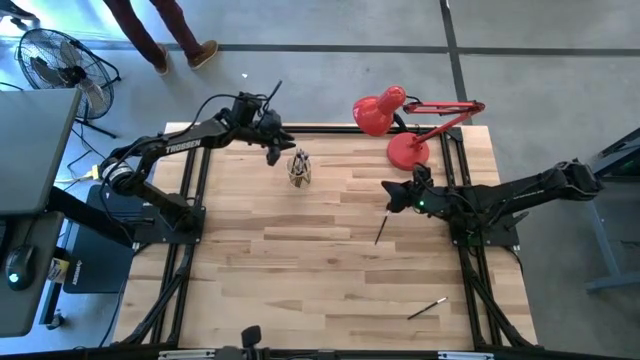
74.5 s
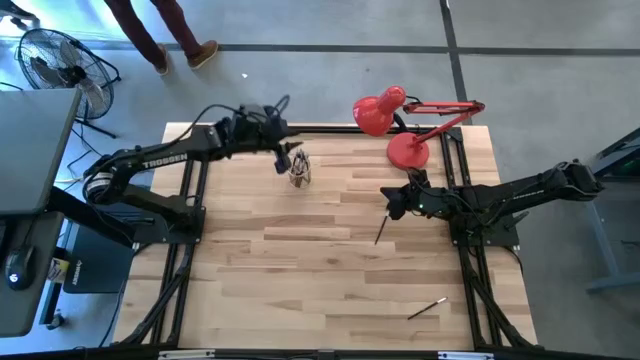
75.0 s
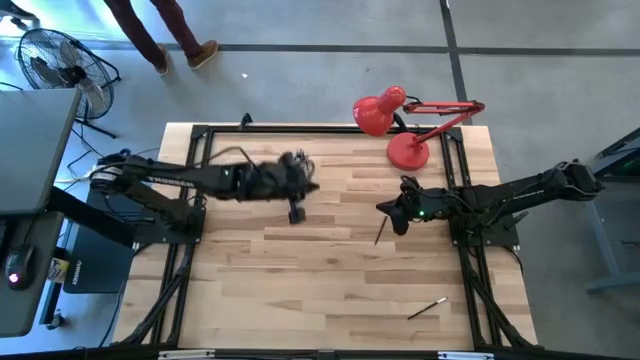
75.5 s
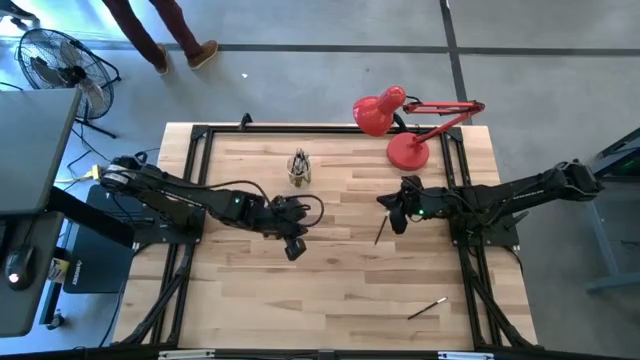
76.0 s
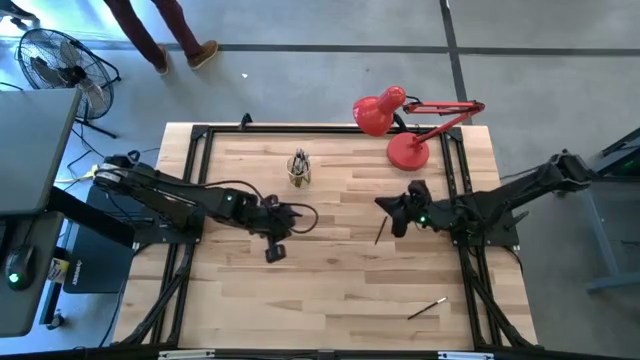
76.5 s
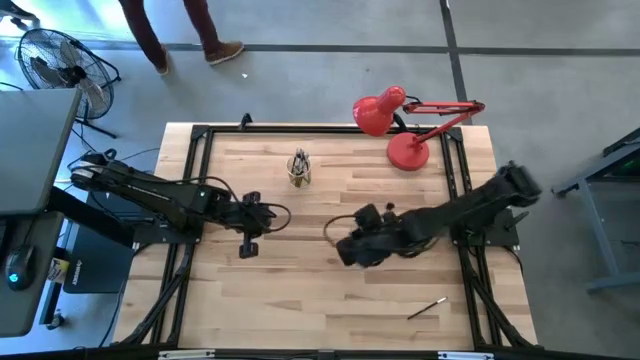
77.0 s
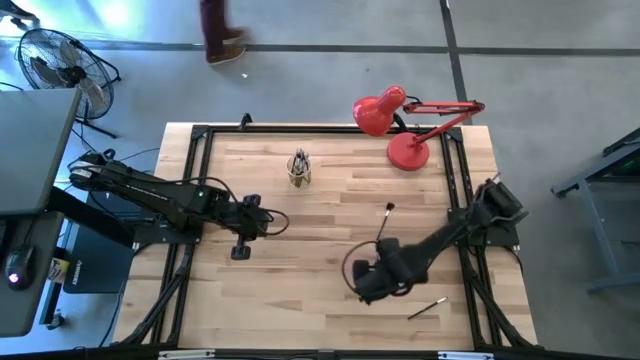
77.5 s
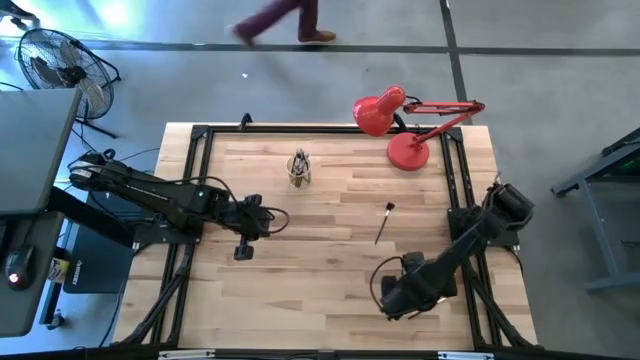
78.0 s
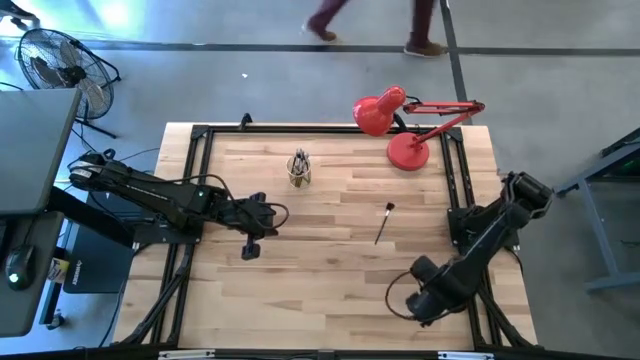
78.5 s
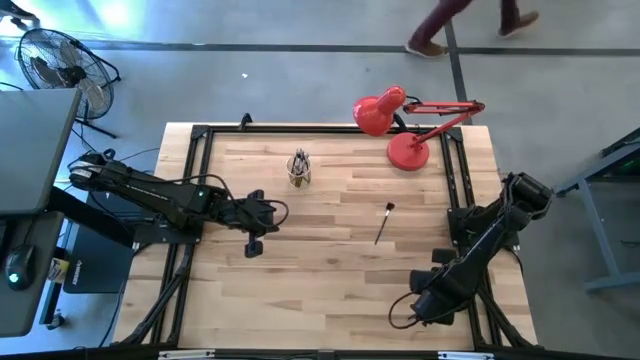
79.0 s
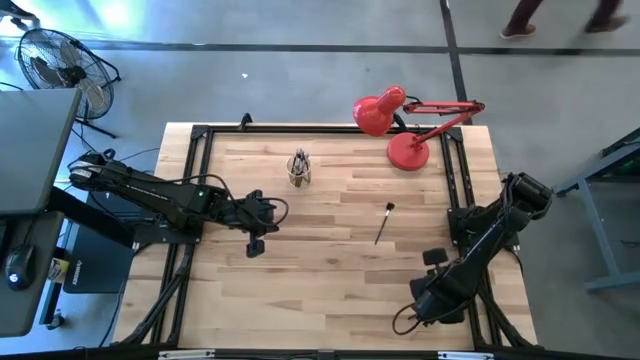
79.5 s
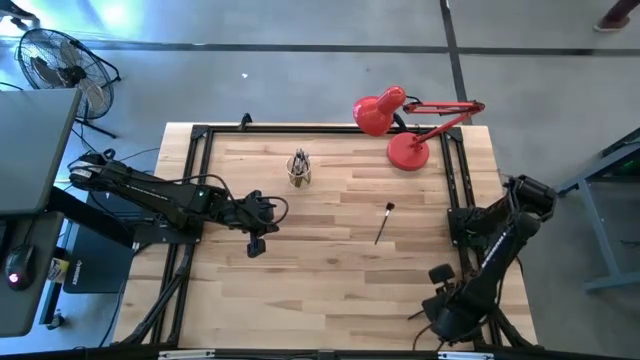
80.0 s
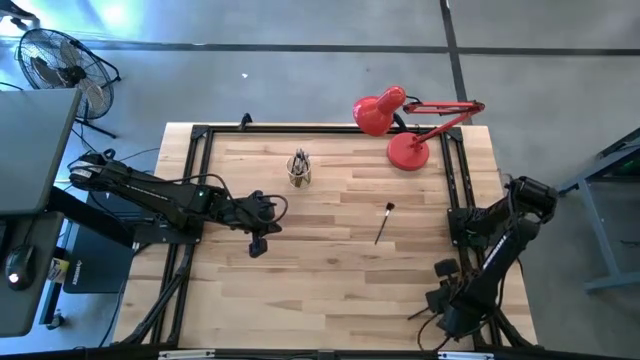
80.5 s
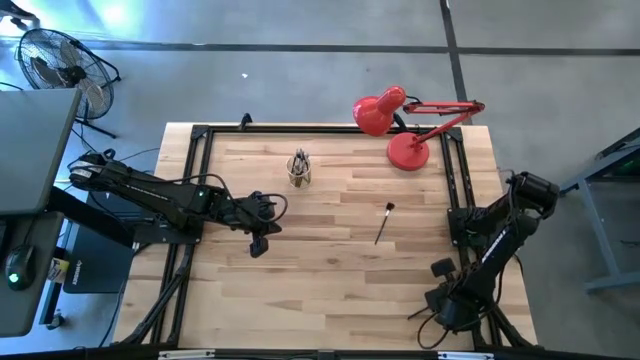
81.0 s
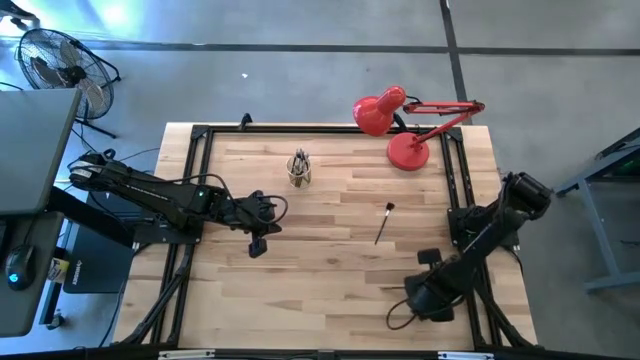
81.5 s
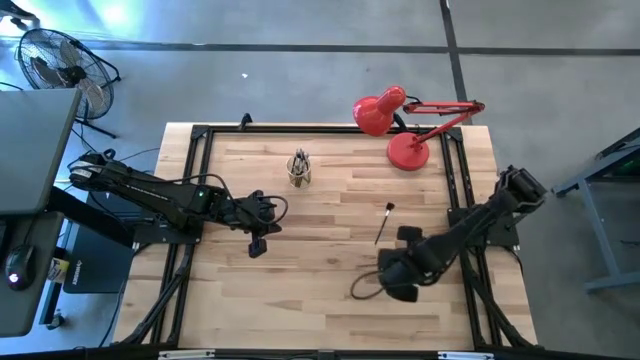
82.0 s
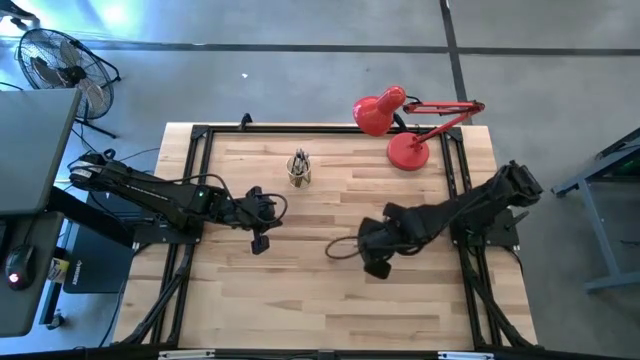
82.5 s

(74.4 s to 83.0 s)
Task: Put items in baskets/containers
Put the eyeliner brush into the wire organizer

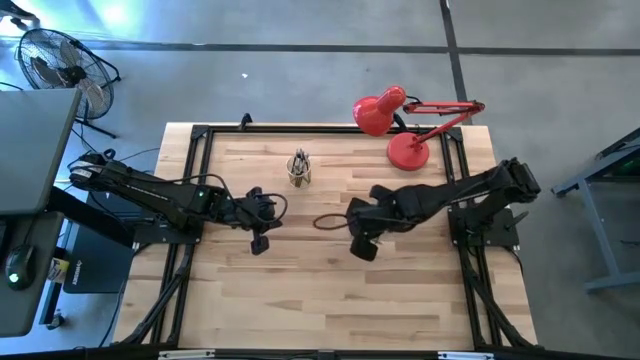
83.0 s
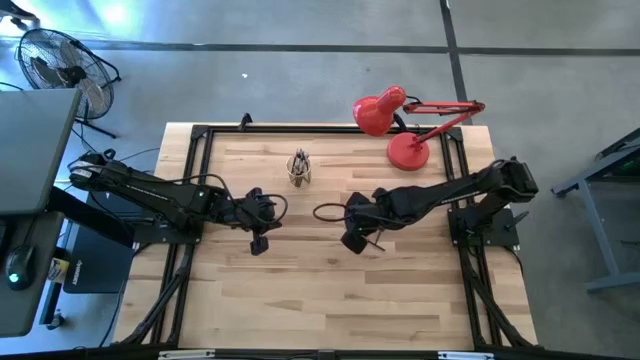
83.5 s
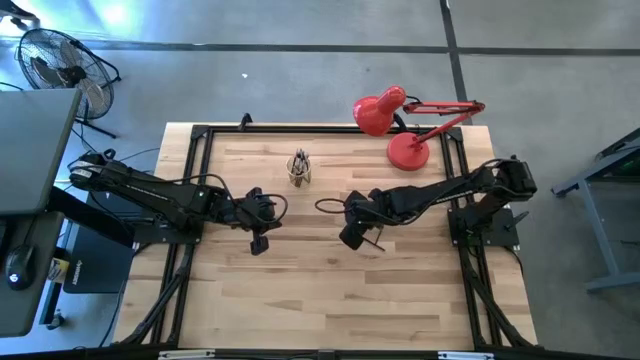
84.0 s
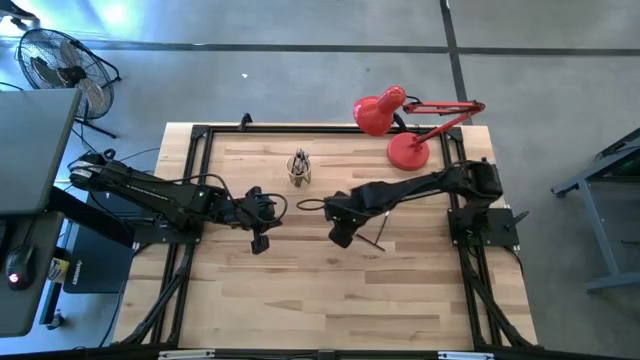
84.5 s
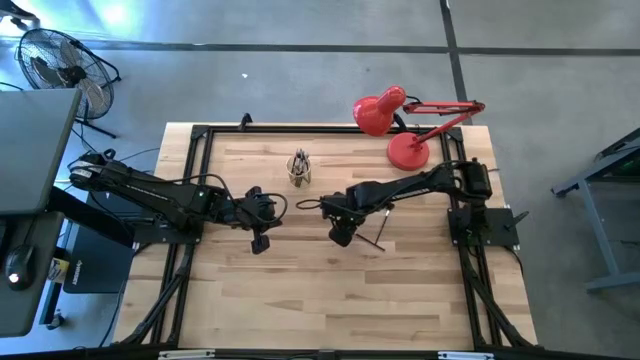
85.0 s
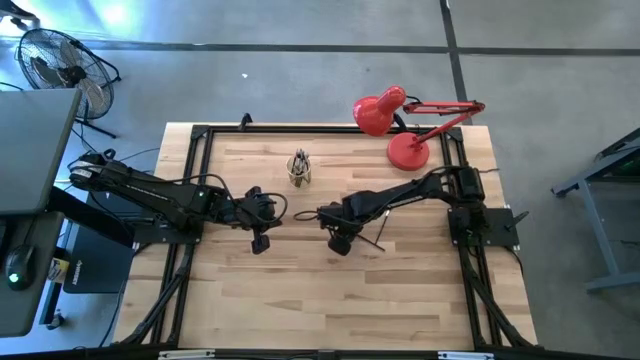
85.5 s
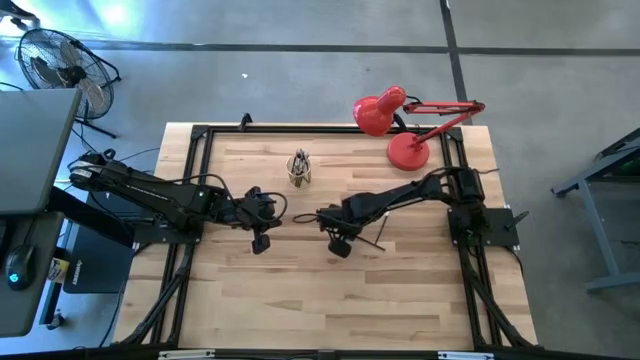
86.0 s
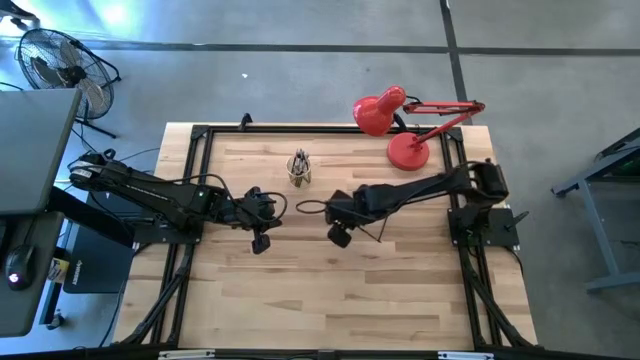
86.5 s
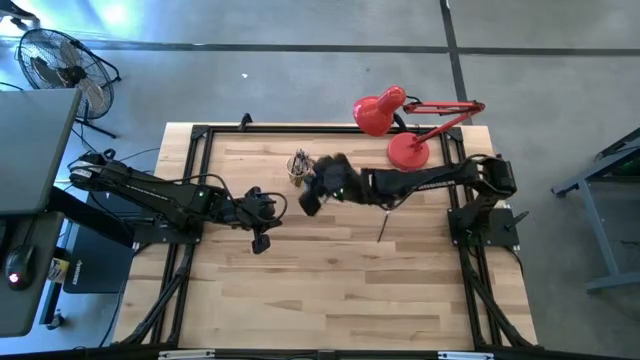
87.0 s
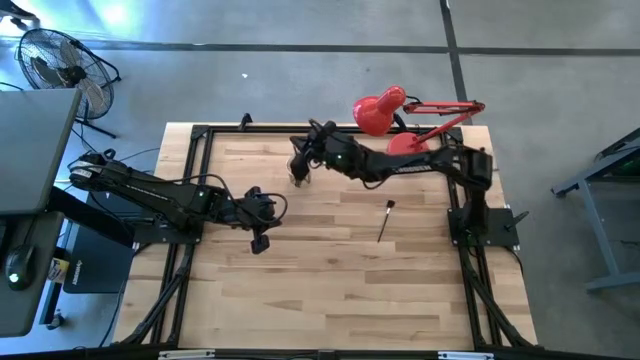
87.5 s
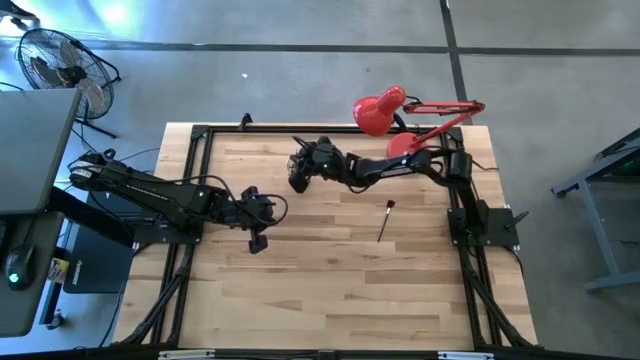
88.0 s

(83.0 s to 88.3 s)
Put the eyeliner brush into the wire organizer

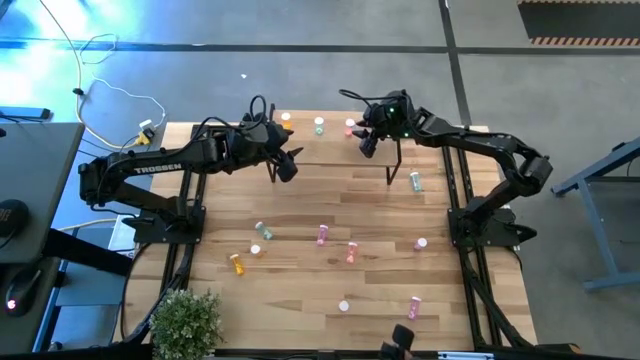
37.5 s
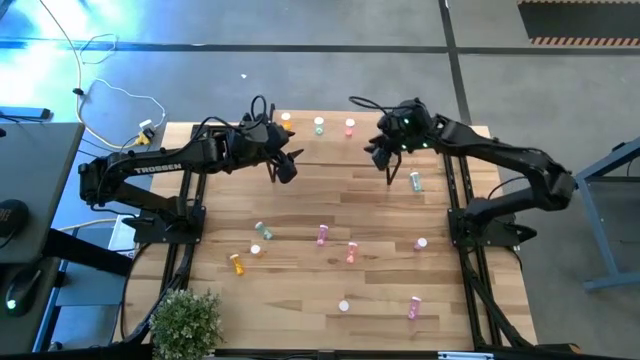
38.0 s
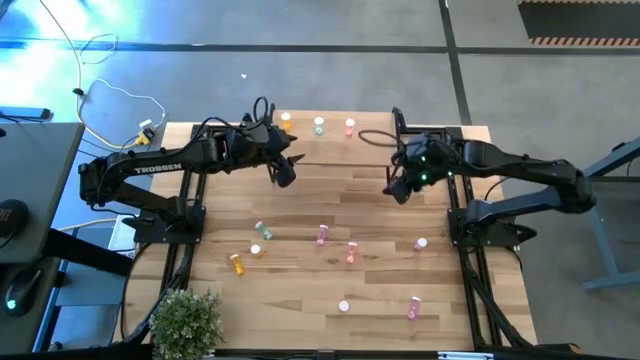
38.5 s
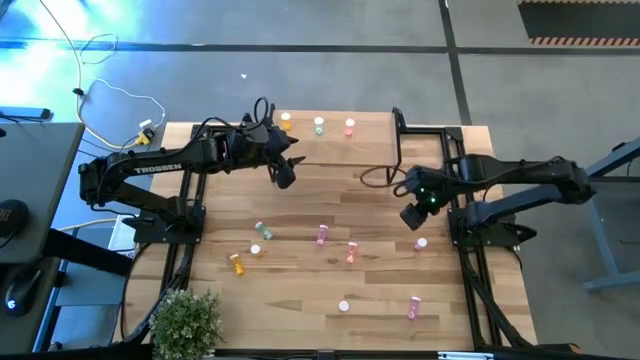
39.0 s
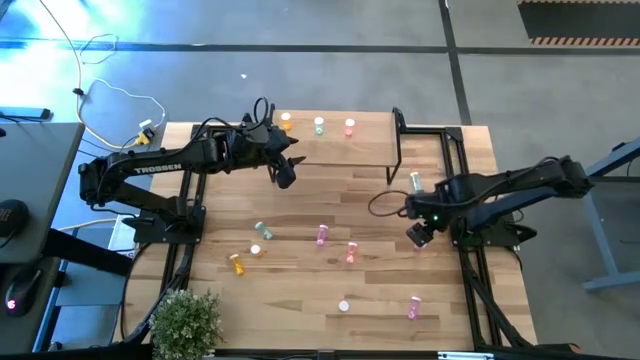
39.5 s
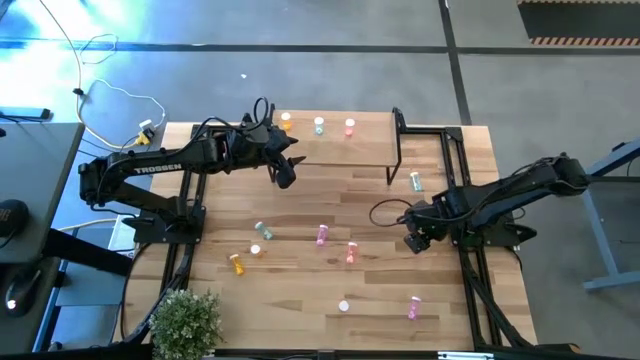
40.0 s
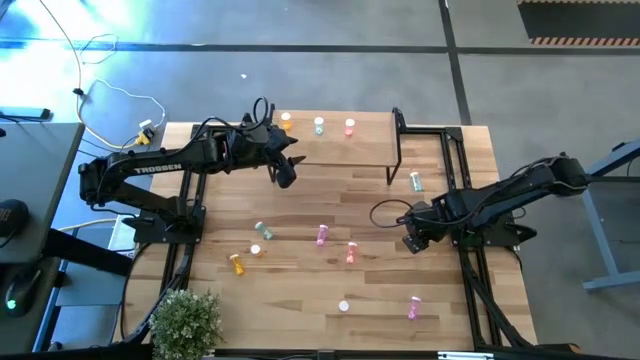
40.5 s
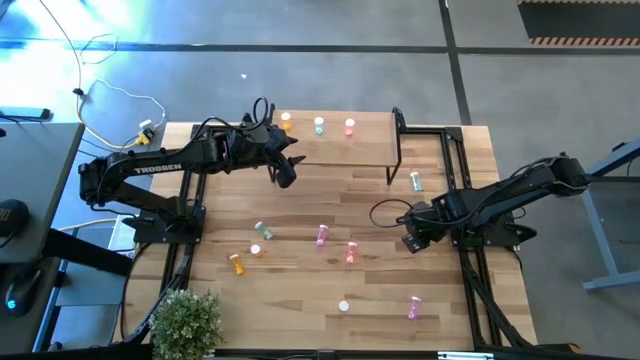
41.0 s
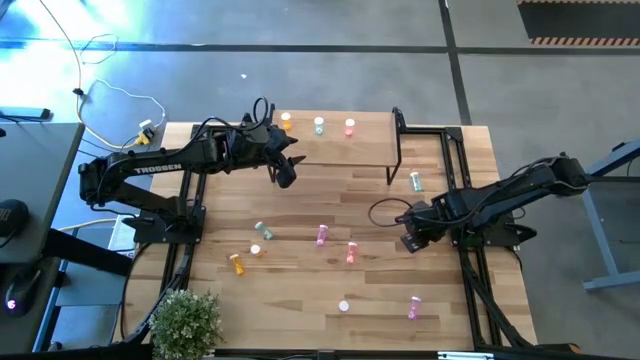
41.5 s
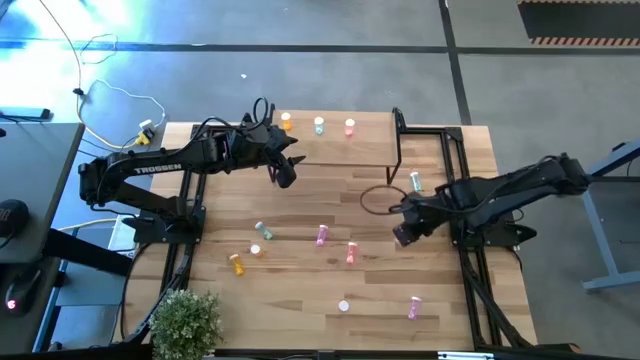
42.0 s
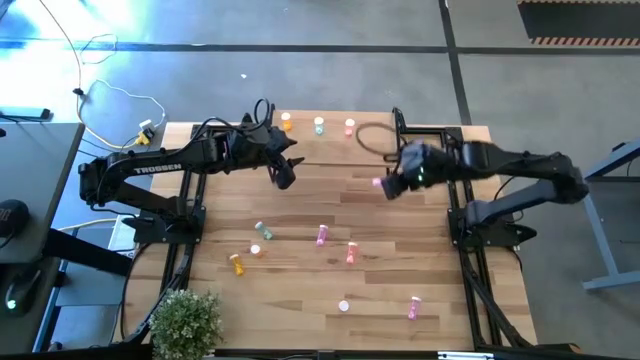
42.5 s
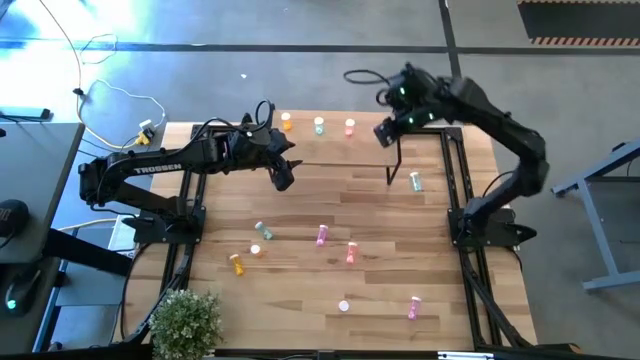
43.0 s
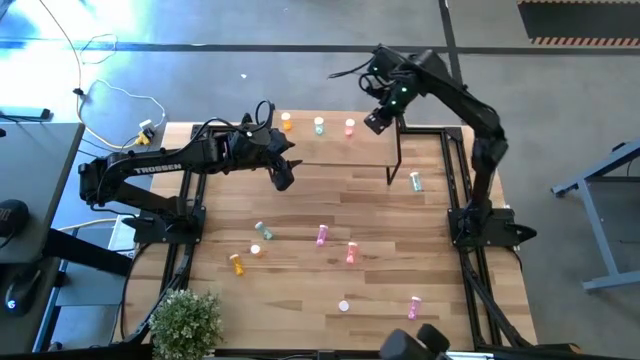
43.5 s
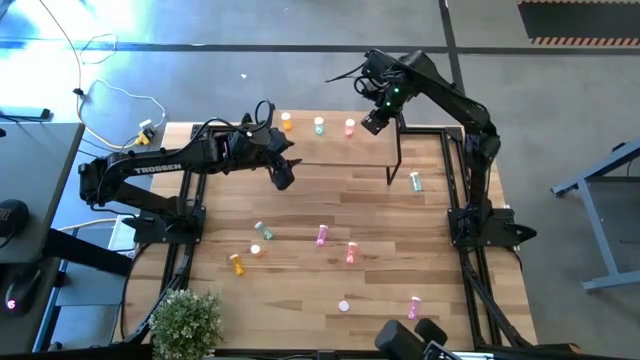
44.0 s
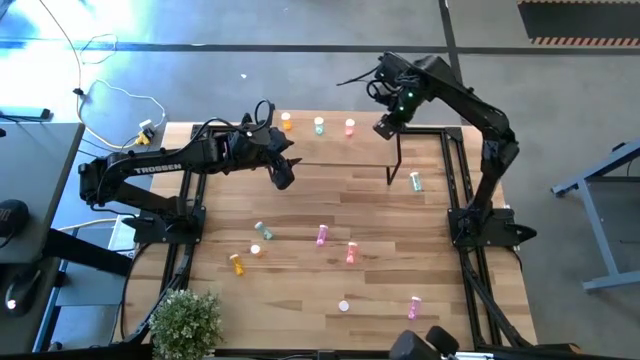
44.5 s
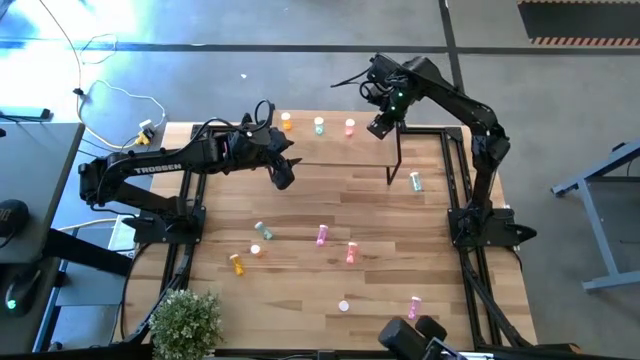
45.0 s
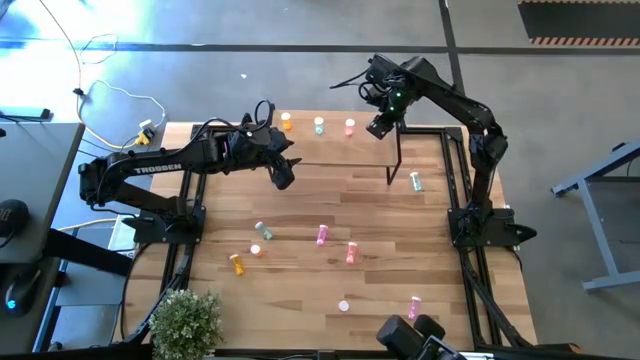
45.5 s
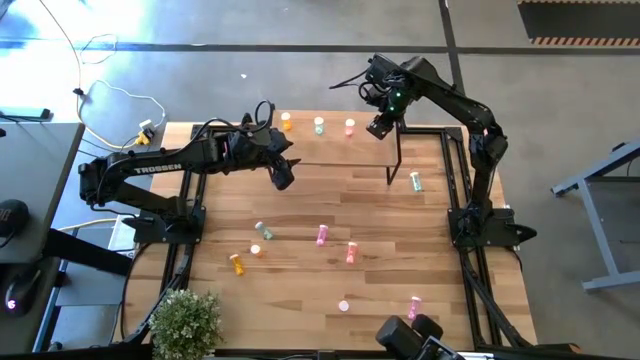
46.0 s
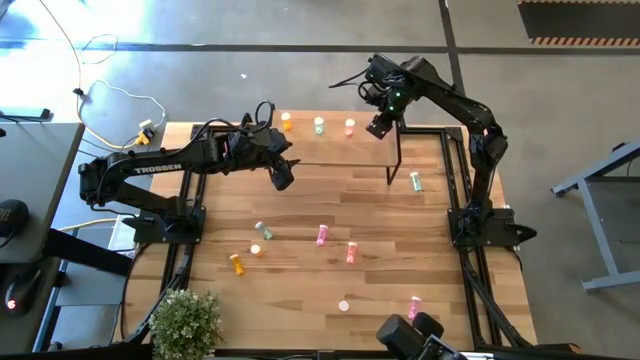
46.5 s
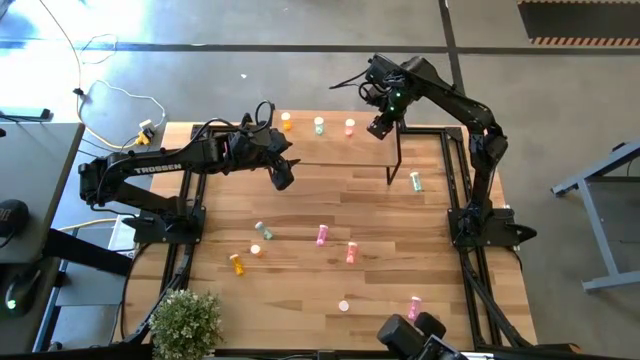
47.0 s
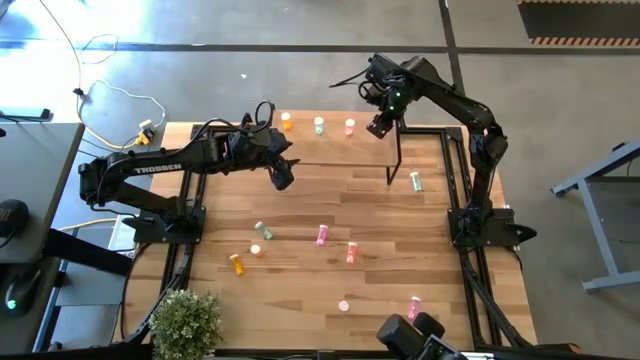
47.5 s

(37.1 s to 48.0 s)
Task: Pick and place medicine bottles onto shelf by color
Put the top right purple pill bottle on the shelf
